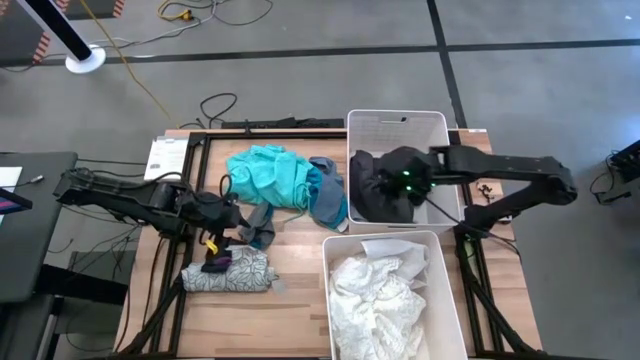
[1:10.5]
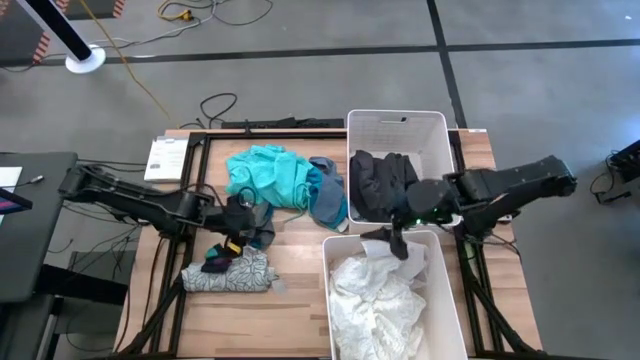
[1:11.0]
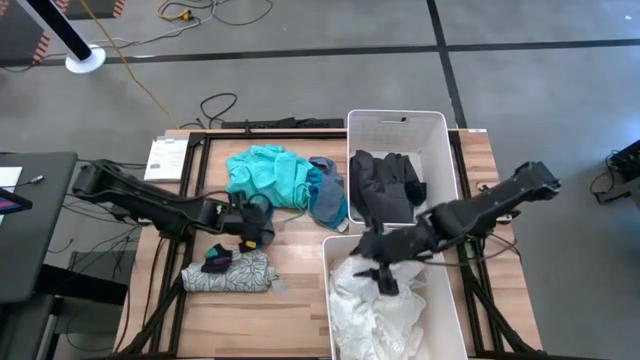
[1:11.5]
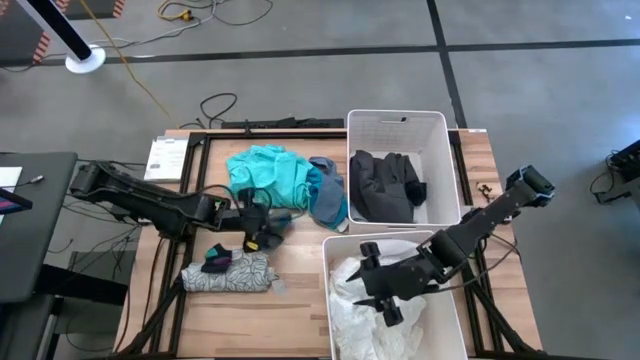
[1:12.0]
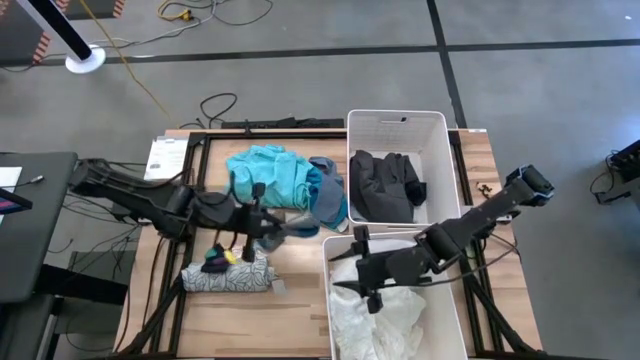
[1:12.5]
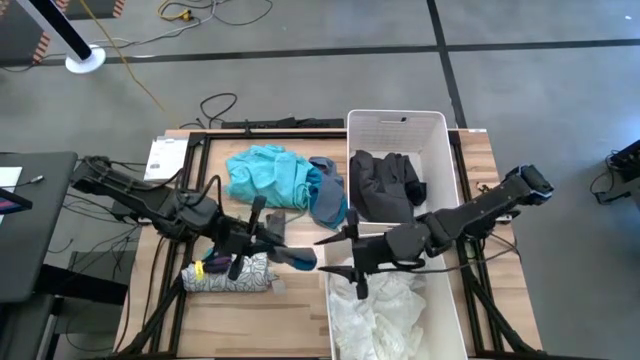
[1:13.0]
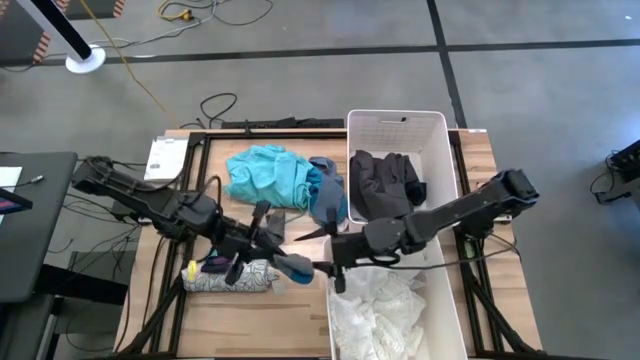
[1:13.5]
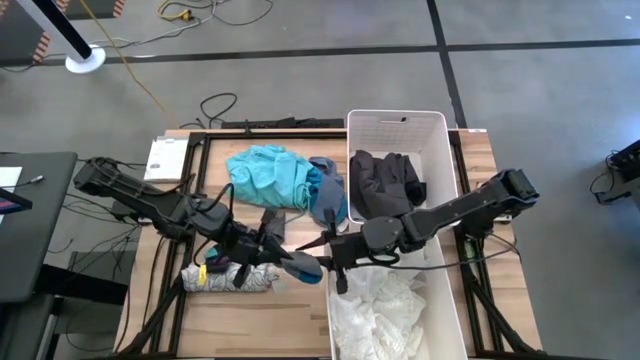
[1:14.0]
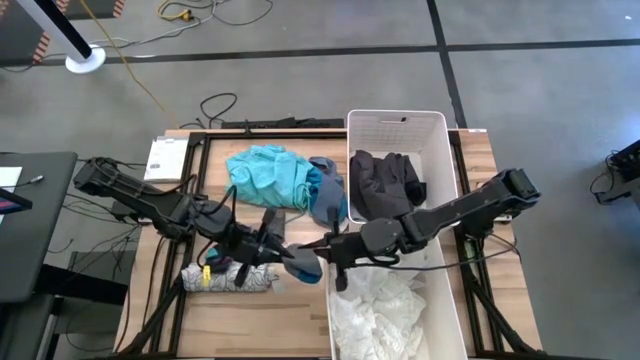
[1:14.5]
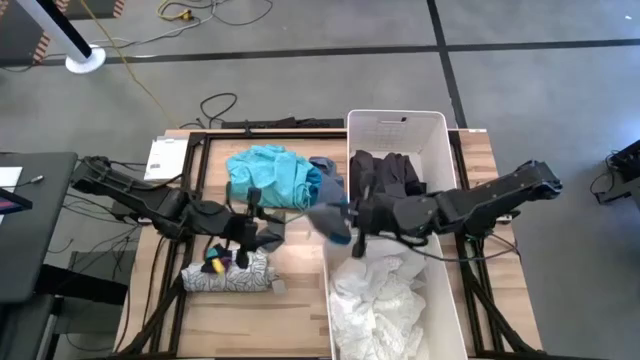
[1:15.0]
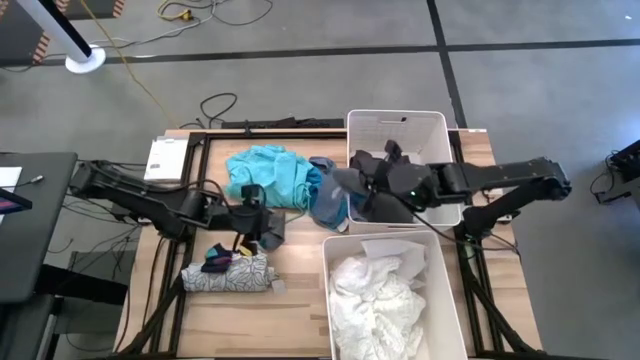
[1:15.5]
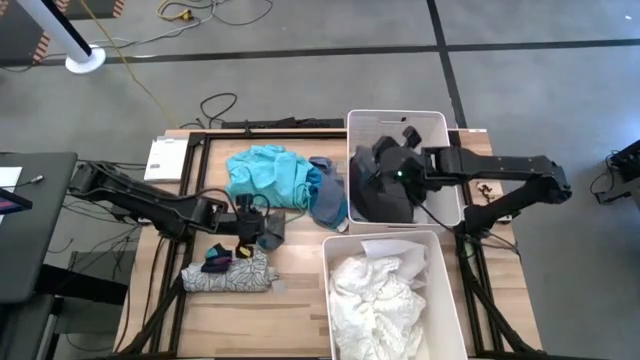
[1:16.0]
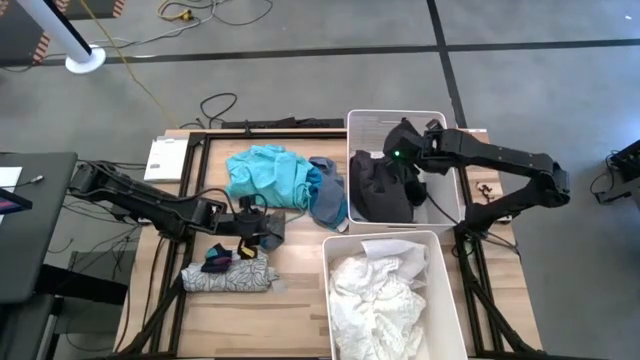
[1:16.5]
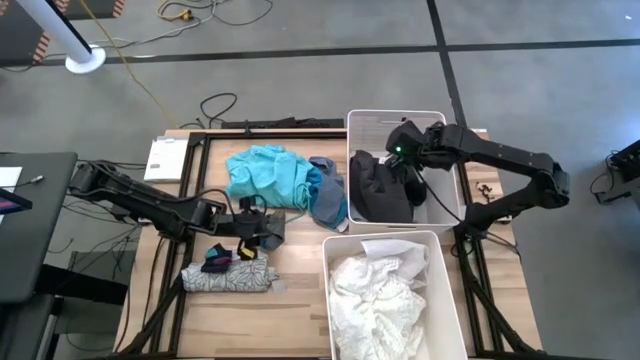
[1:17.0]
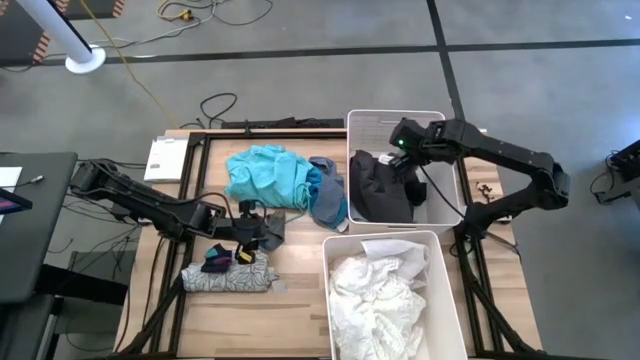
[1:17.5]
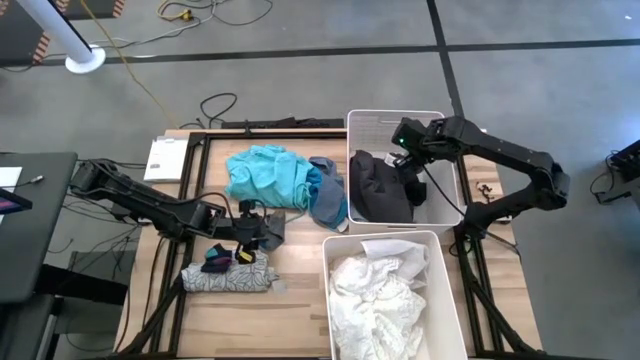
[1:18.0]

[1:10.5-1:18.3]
Task: Sort clothes
Put the top grey sock into the top white laundry bin

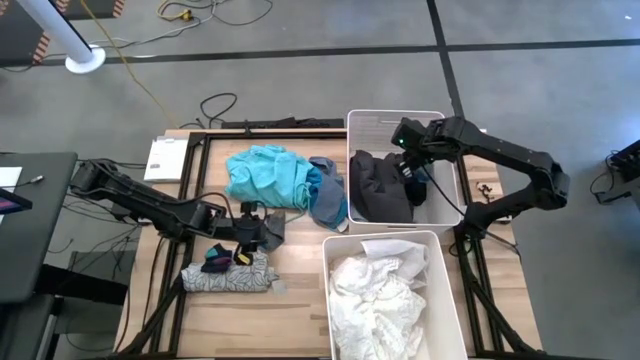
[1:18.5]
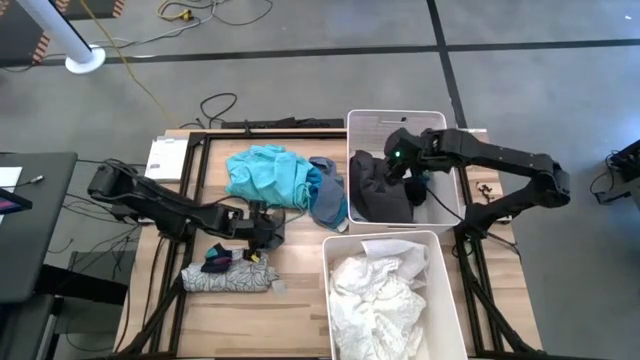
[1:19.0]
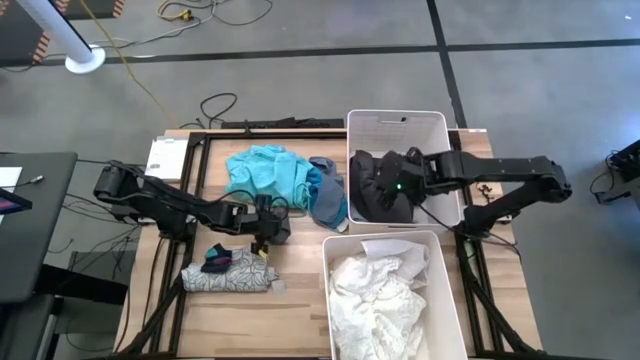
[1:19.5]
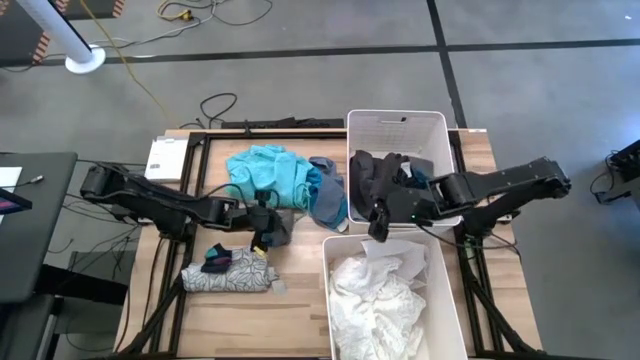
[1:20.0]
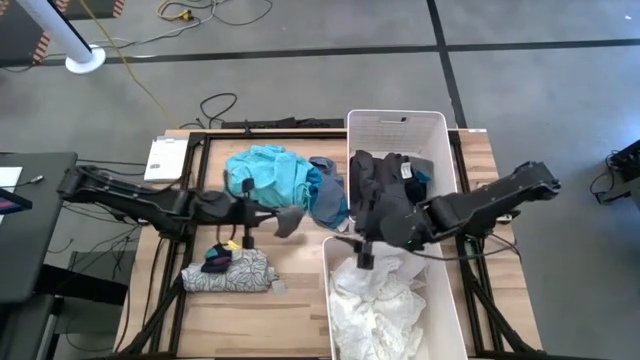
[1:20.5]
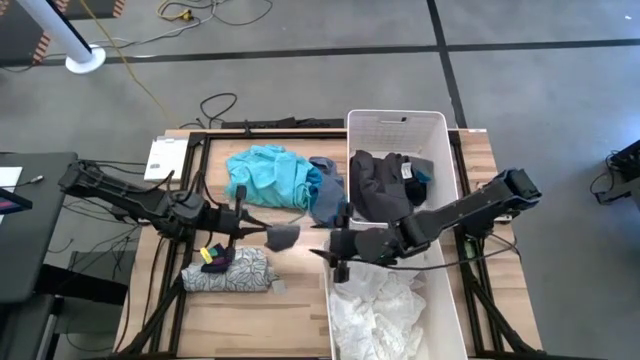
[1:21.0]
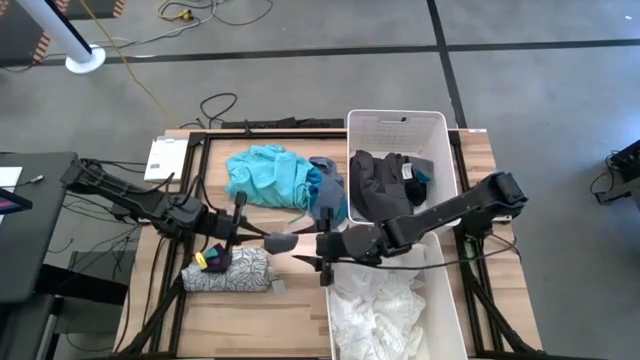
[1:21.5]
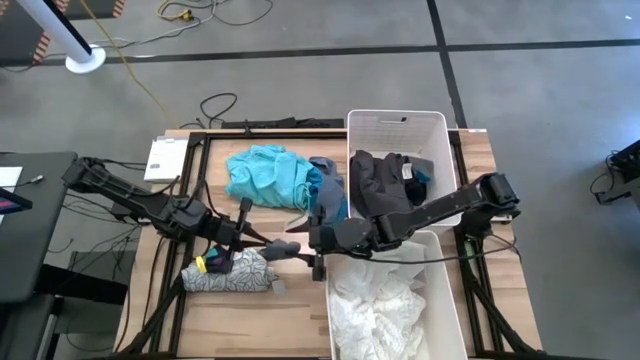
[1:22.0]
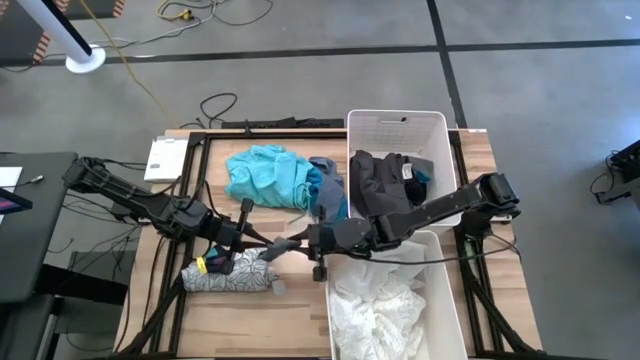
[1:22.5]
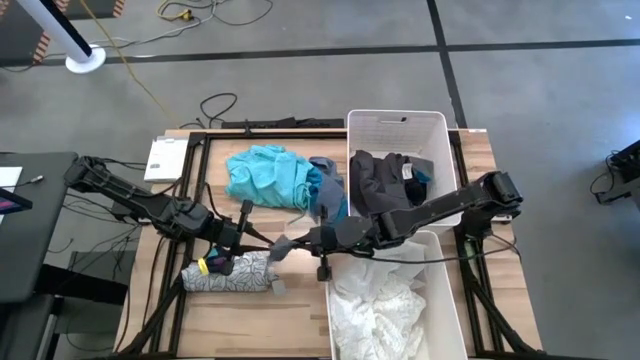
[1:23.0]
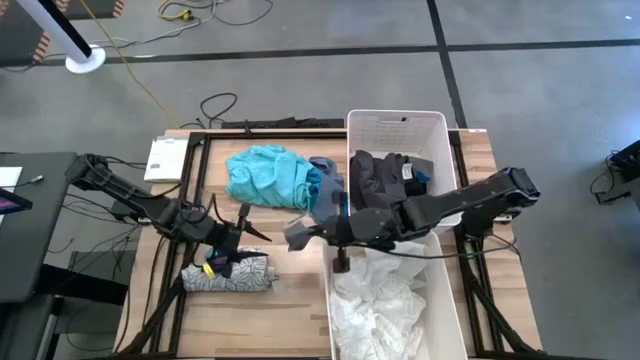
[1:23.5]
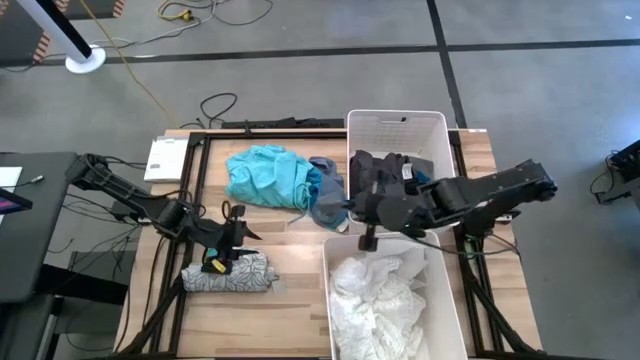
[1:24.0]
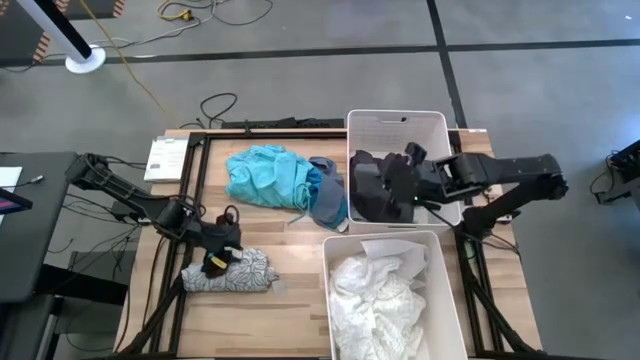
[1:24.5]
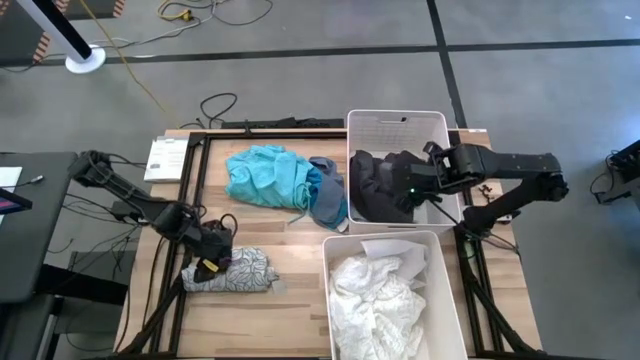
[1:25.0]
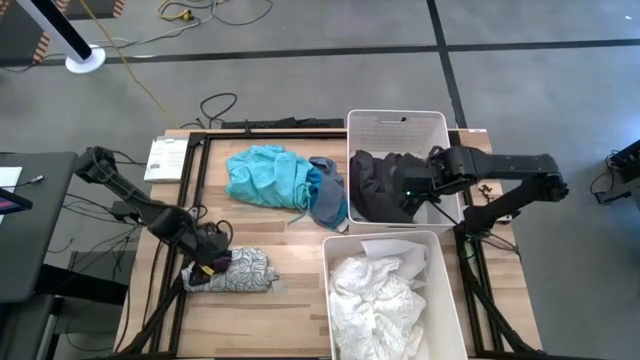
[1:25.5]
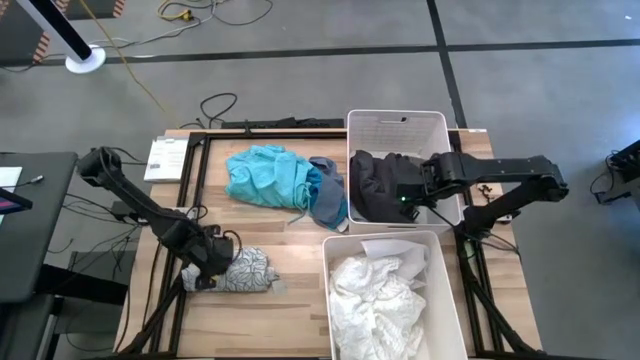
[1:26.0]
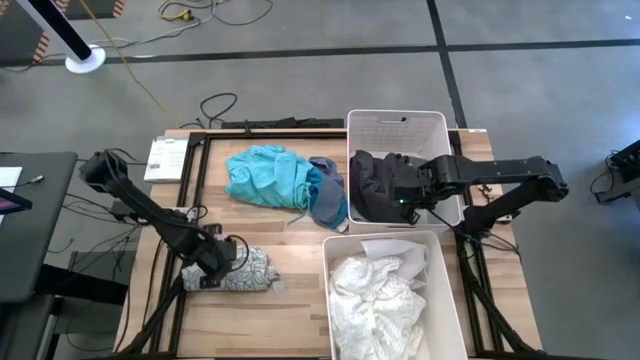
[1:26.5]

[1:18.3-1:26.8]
Put the grey sock into the top white laundry bin

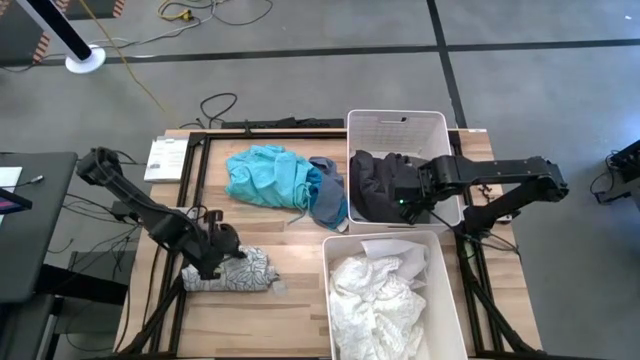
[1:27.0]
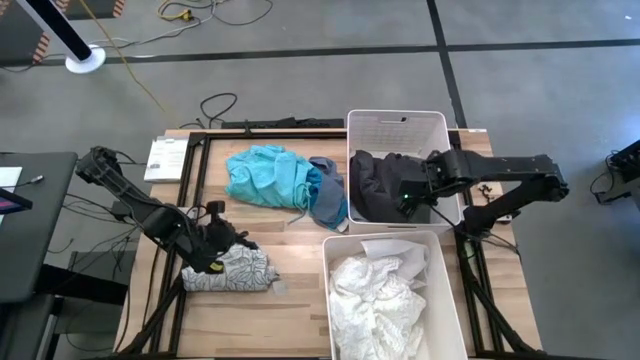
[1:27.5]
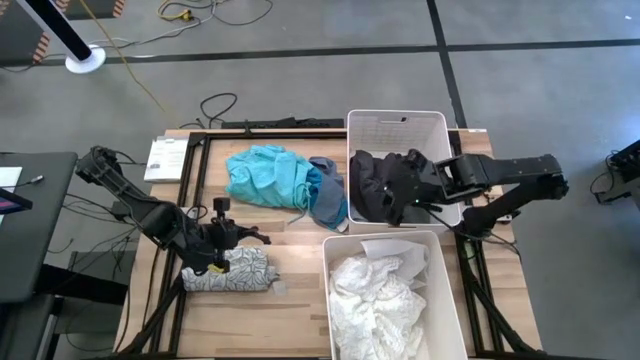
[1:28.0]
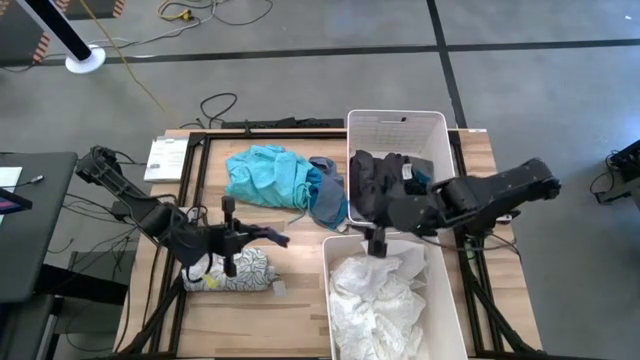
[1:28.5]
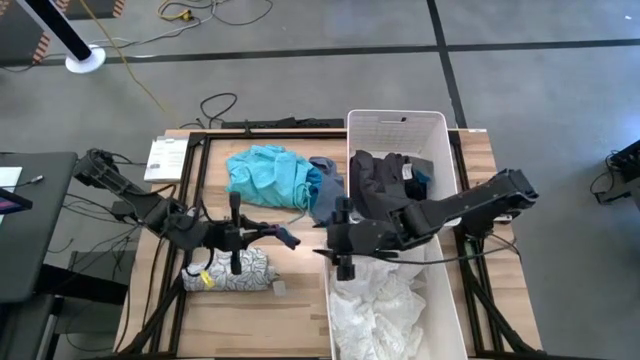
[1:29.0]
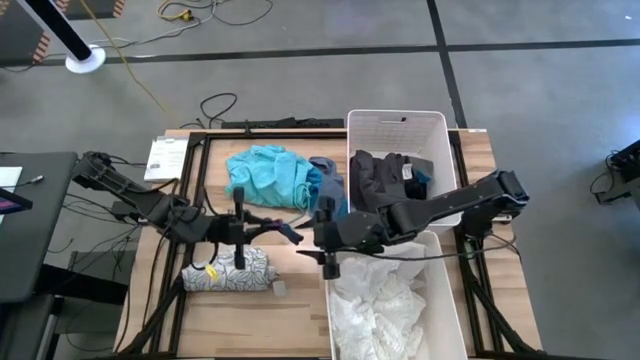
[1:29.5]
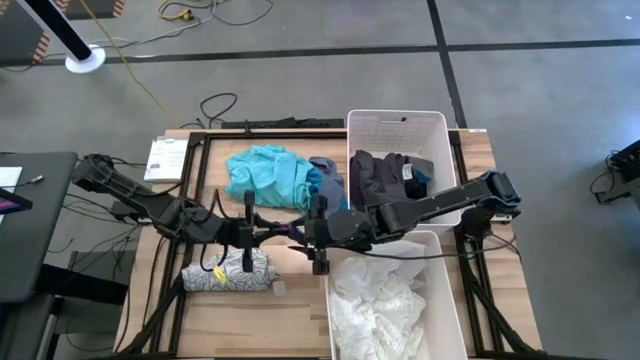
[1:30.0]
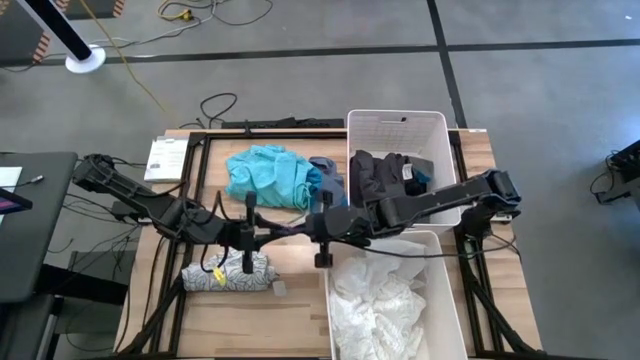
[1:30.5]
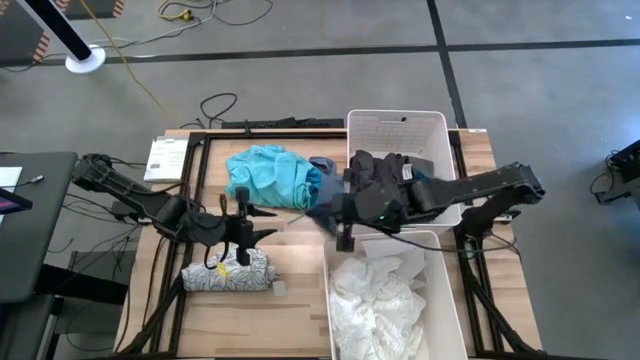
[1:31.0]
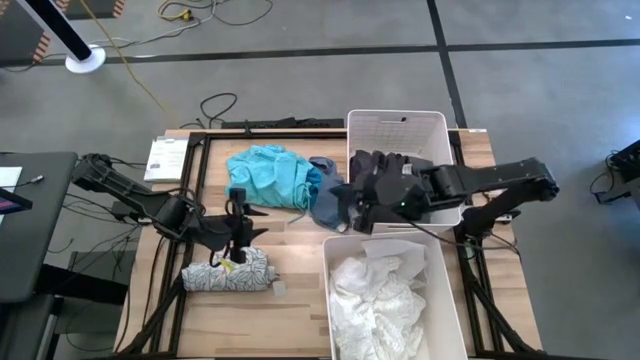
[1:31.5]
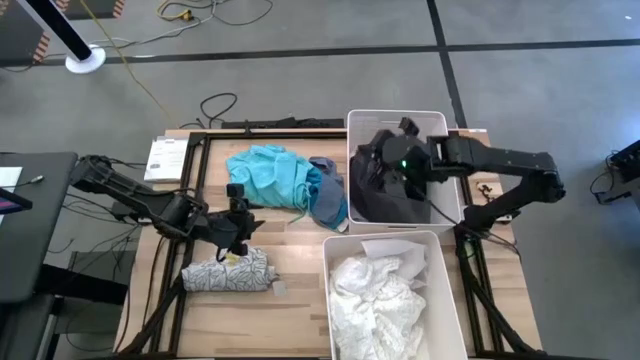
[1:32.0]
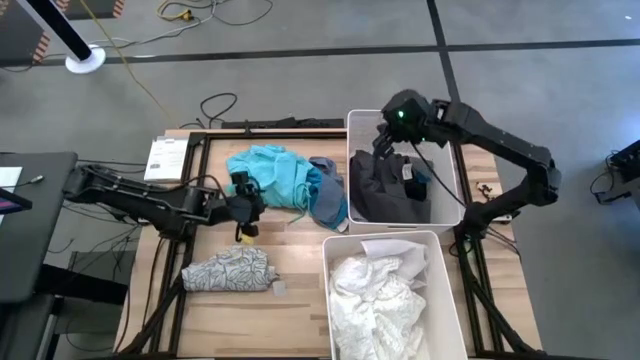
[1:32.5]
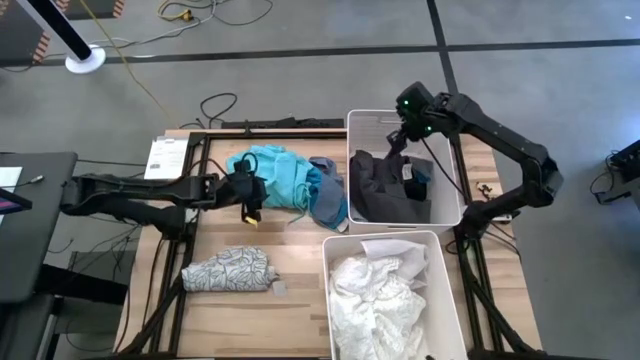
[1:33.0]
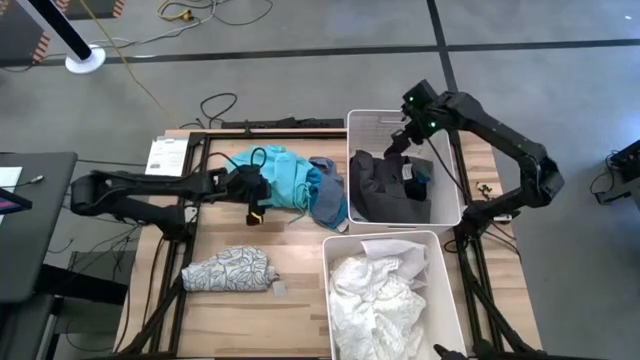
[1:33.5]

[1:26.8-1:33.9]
Put the dark blue sock into the top white laundry bin
